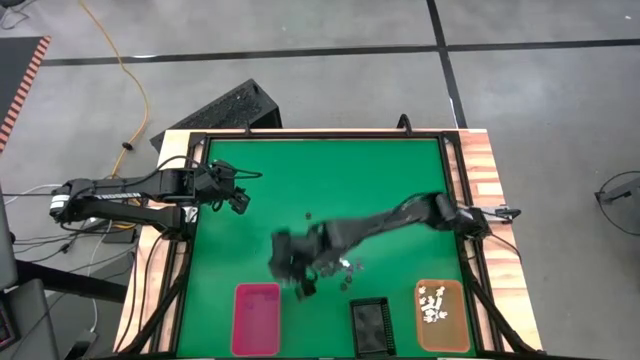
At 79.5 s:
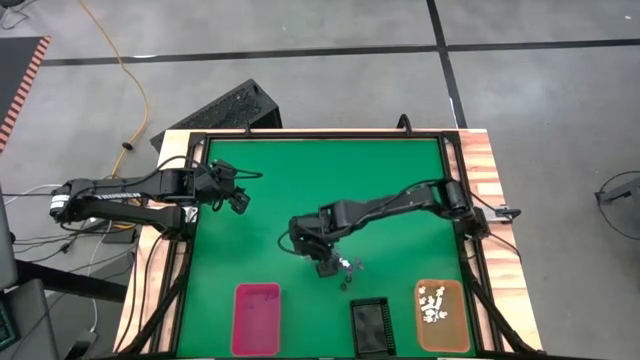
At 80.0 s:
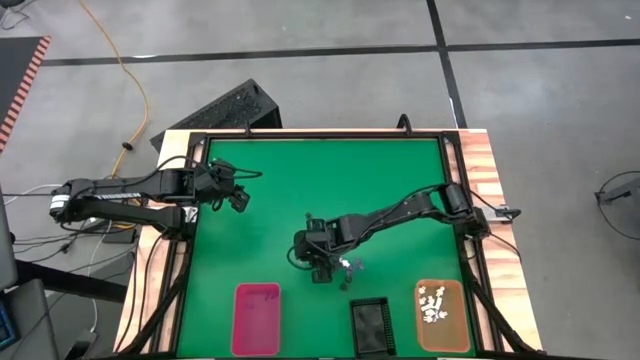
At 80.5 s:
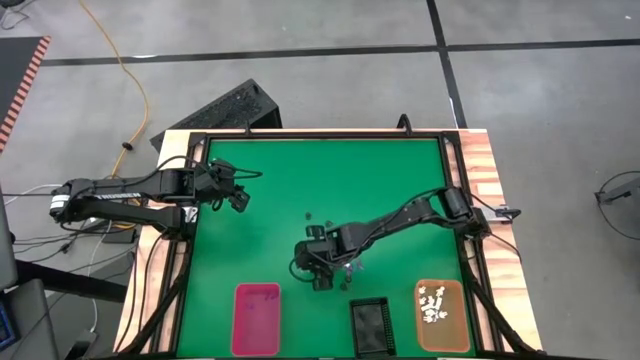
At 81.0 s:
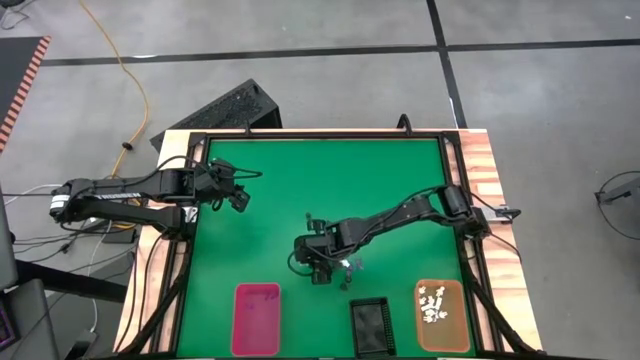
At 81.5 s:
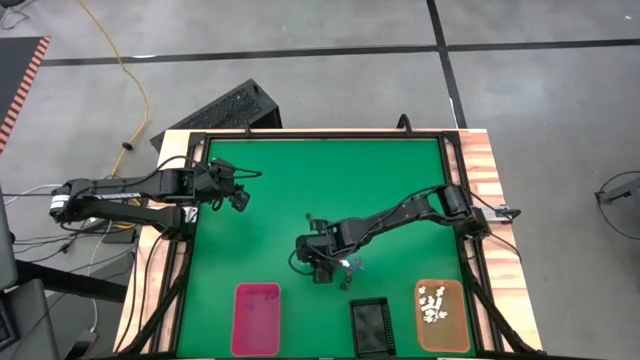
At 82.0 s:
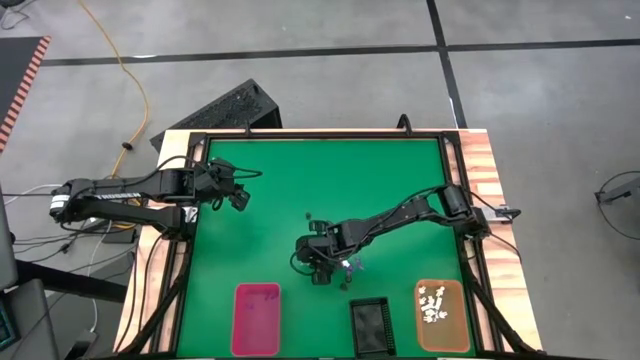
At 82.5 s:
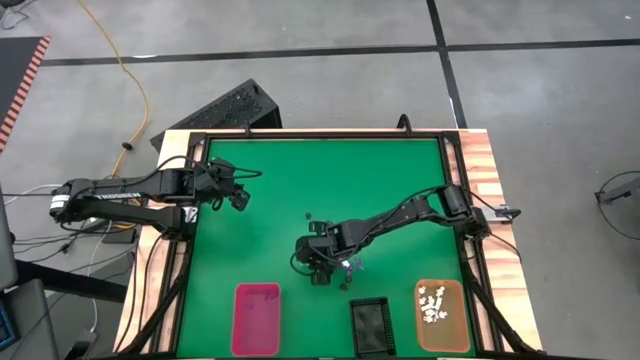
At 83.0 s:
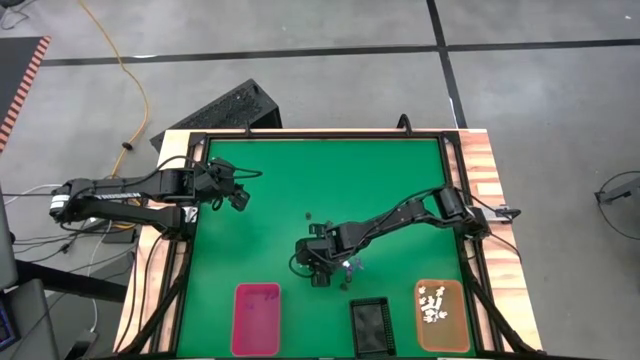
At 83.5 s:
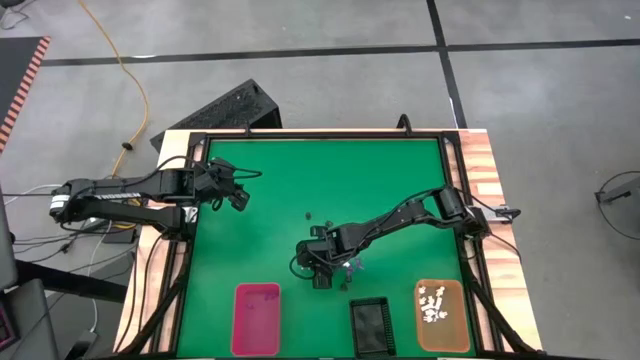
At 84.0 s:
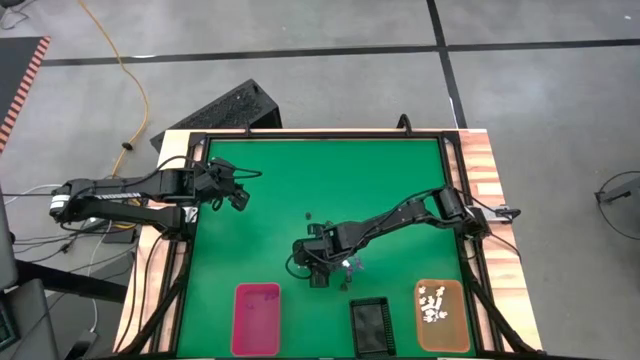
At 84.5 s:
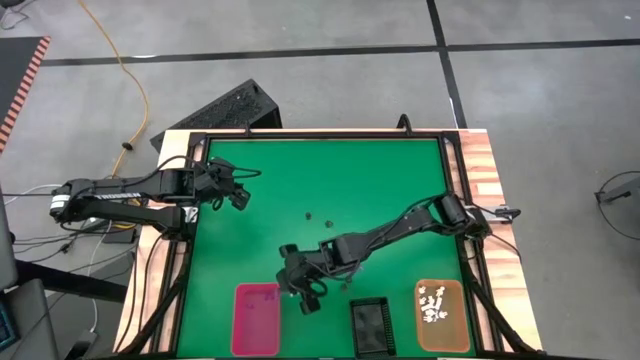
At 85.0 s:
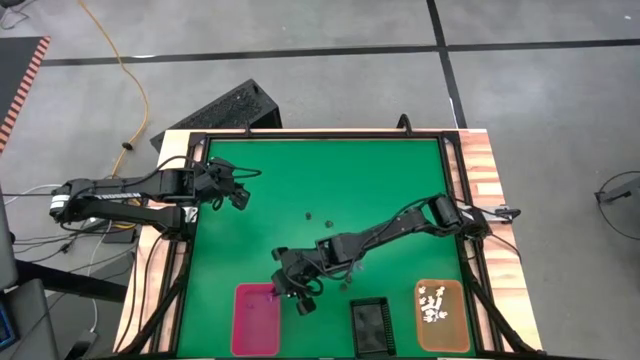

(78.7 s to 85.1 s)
Task: Sort Halloween decoration
Put the violet witch hat toy into the red organizing bin

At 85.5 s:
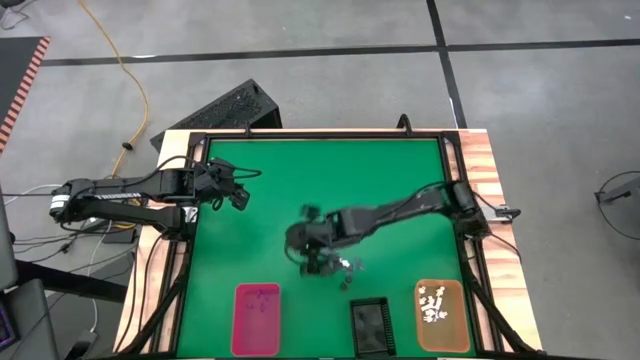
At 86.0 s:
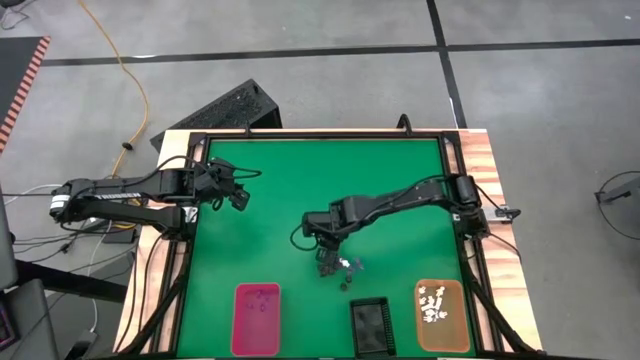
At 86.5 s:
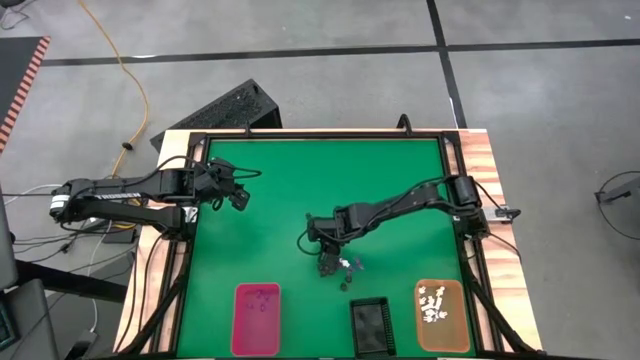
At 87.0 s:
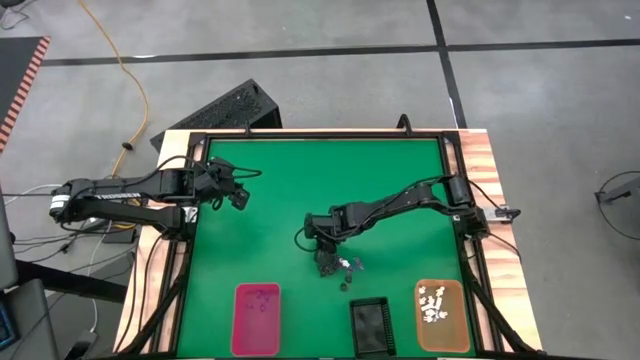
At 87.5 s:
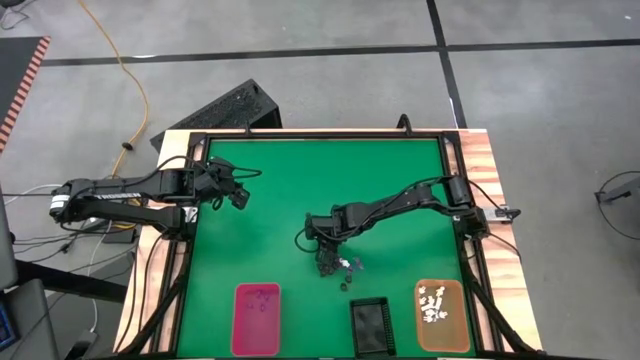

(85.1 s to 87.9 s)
Put the violet witch hat toy into the red organizing bin

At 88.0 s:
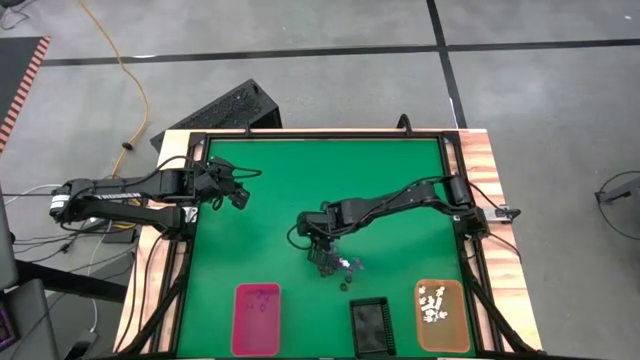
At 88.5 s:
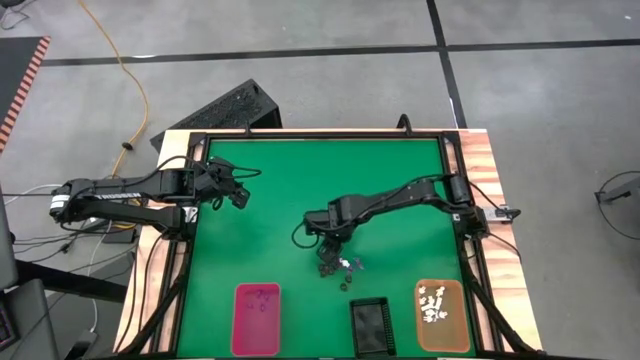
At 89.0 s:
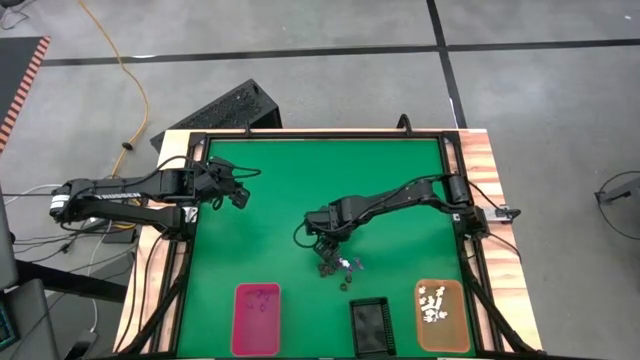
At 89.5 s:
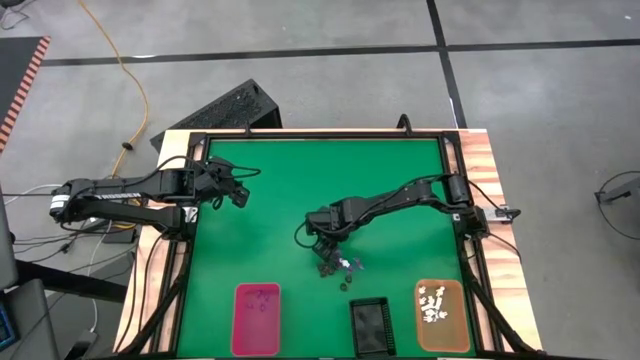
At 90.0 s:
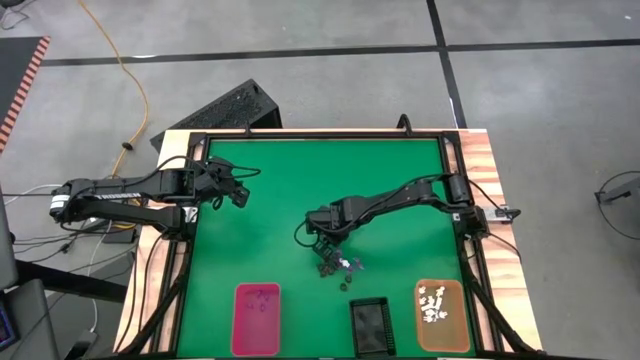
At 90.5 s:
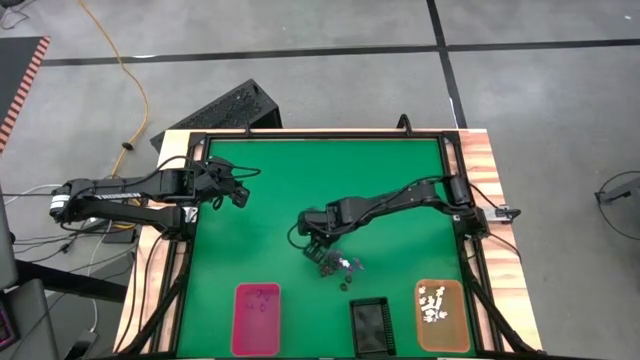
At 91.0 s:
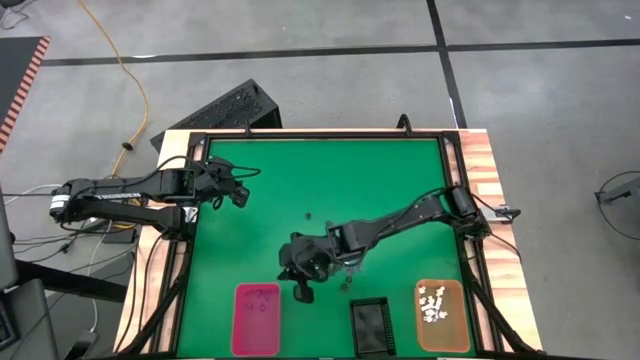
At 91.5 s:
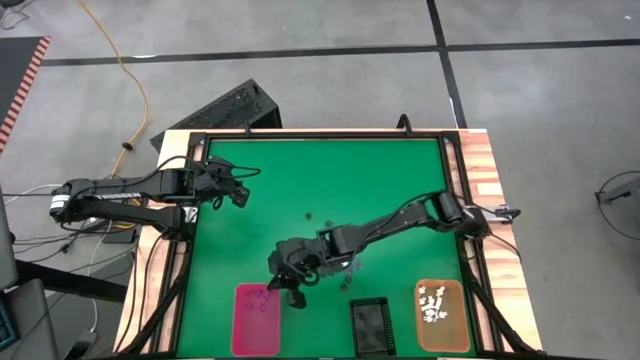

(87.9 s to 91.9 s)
Put the violet witch hat toy into the red organizing bin

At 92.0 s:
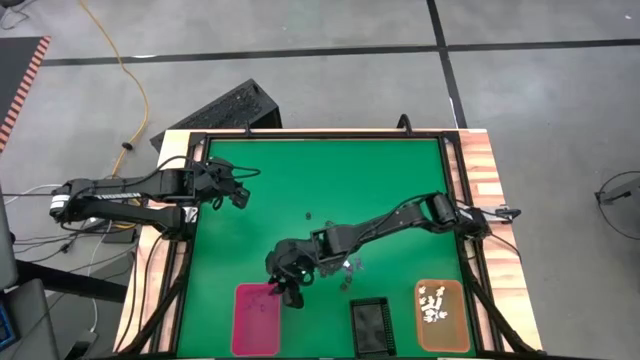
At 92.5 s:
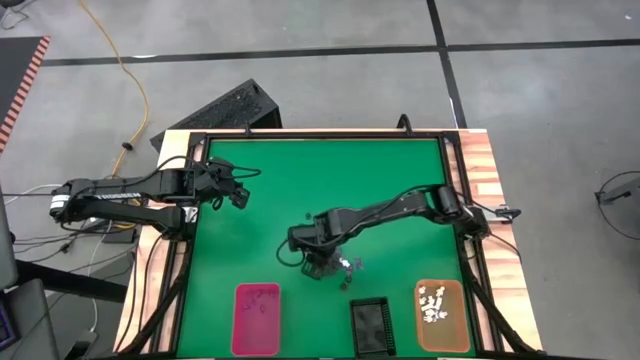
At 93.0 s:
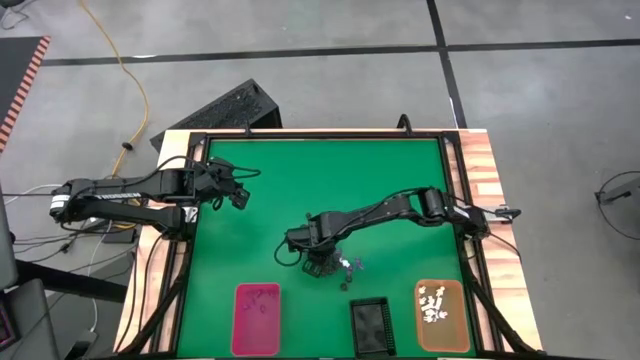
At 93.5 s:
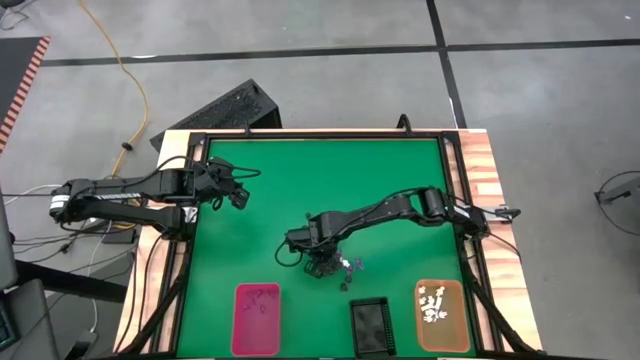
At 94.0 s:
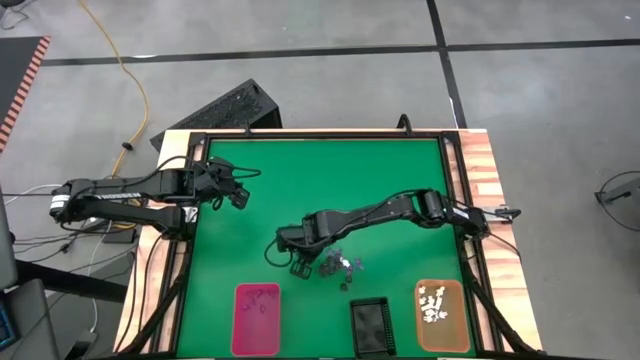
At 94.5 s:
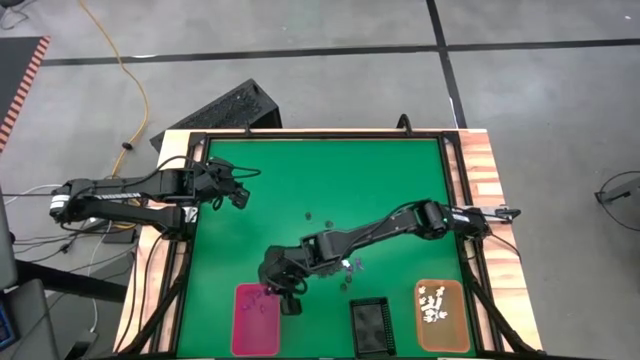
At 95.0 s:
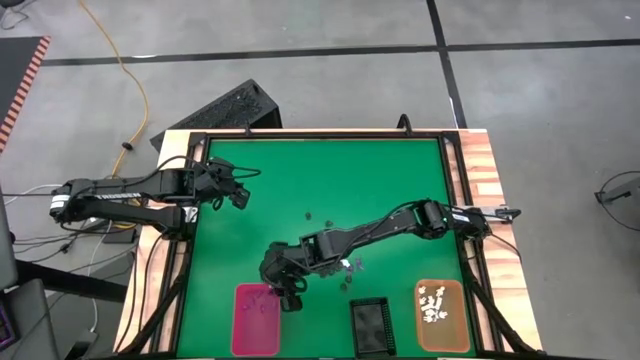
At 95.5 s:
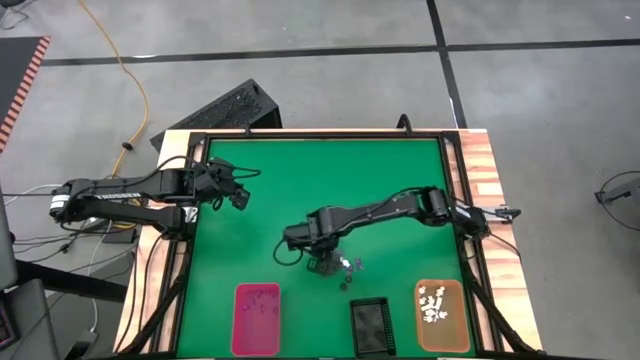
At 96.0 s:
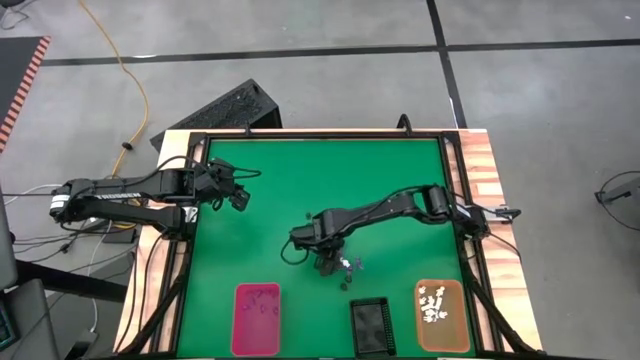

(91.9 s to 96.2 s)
Put the violet witch hat toy into the red organizing bin

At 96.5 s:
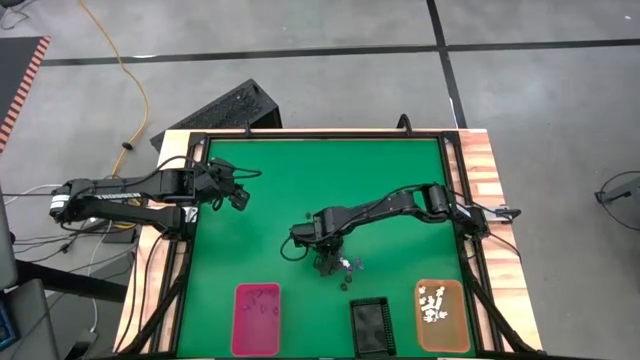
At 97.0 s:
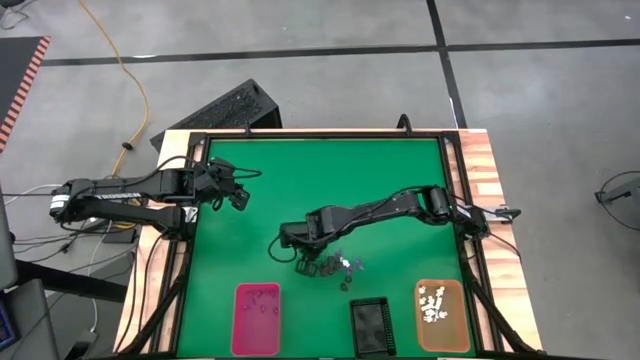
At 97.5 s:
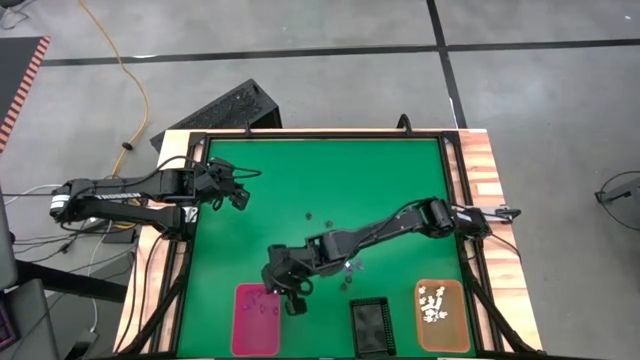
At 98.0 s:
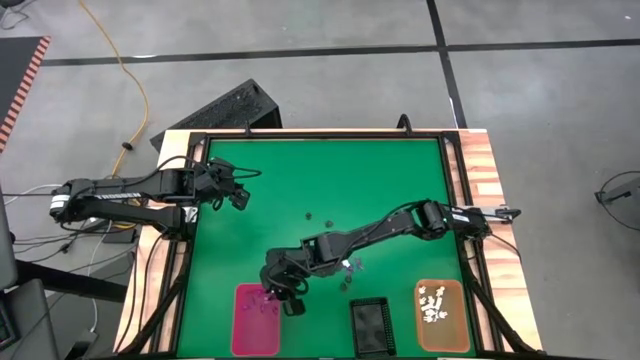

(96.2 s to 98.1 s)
Put the violet witch hat toy into the red organizing bin

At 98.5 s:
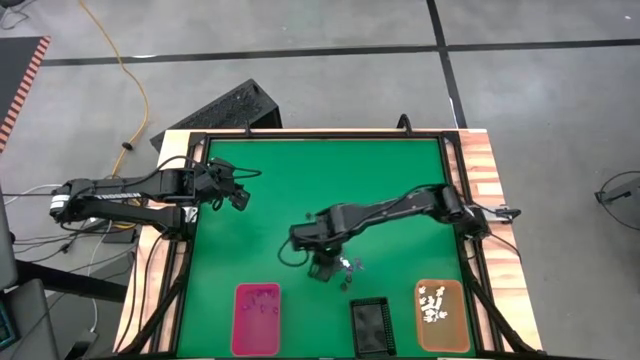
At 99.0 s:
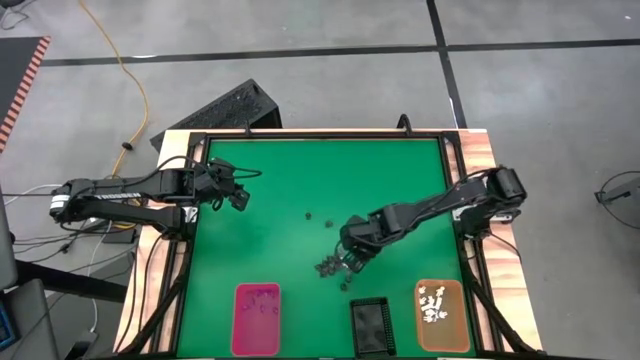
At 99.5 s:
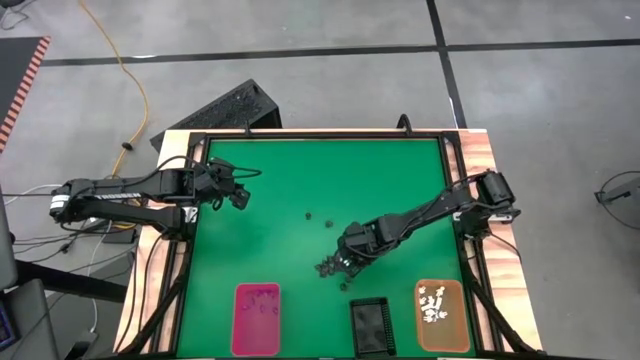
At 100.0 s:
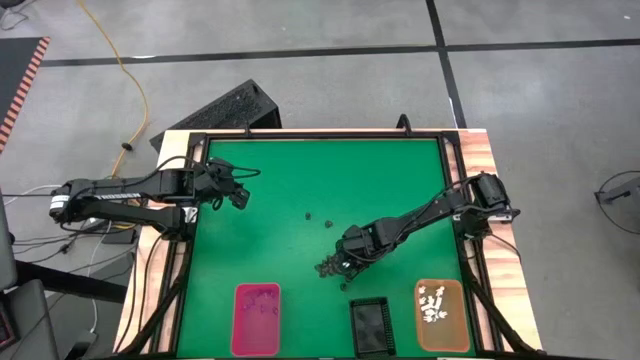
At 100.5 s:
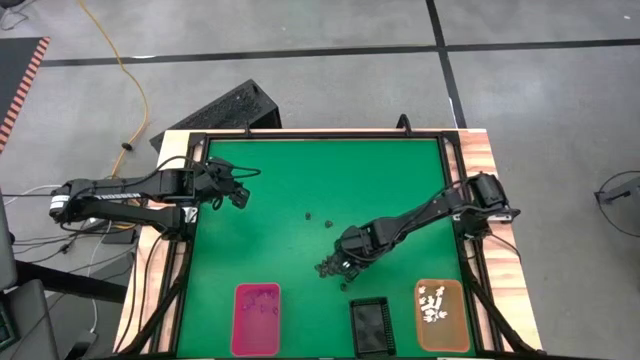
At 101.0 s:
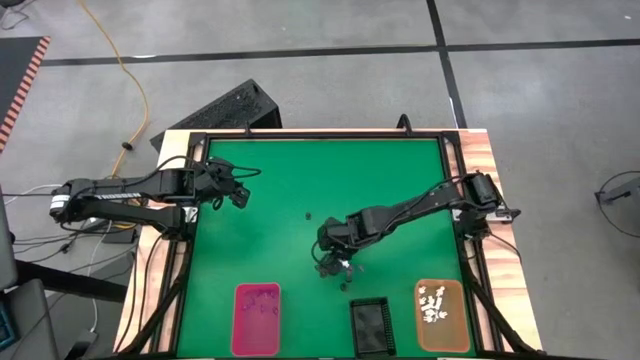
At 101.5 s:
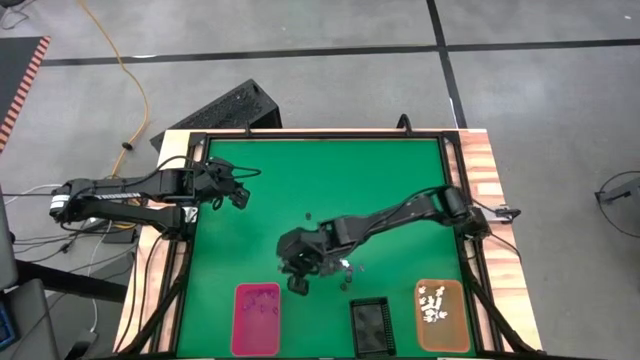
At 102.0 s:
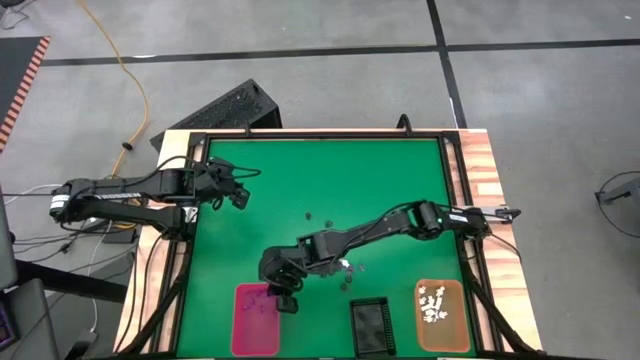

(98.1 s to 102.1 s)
Put the violet witch hat toy into the red organizing bin
